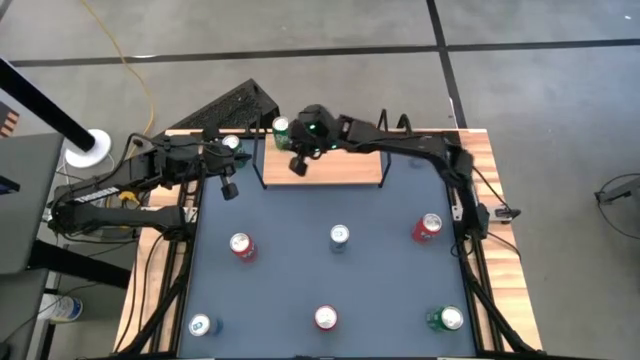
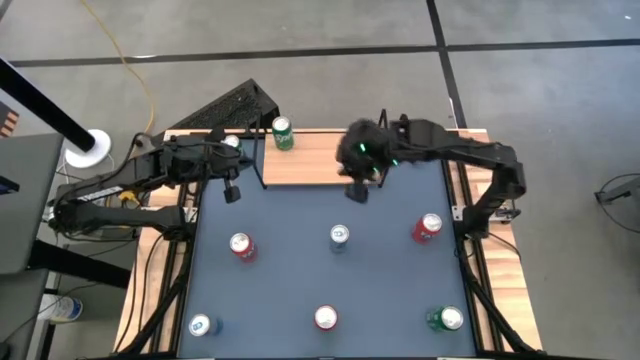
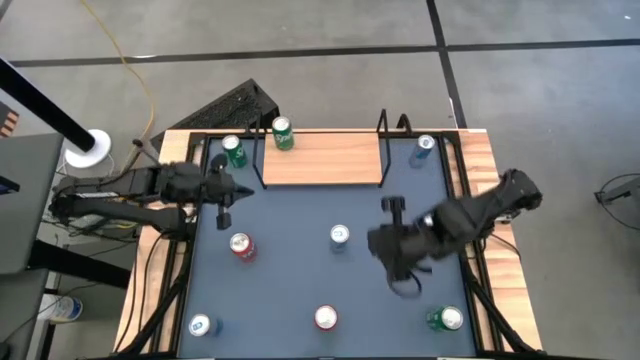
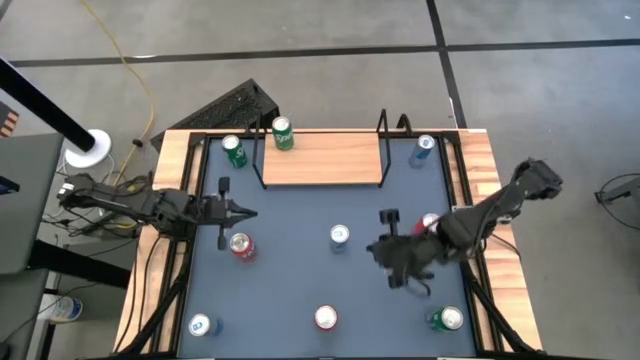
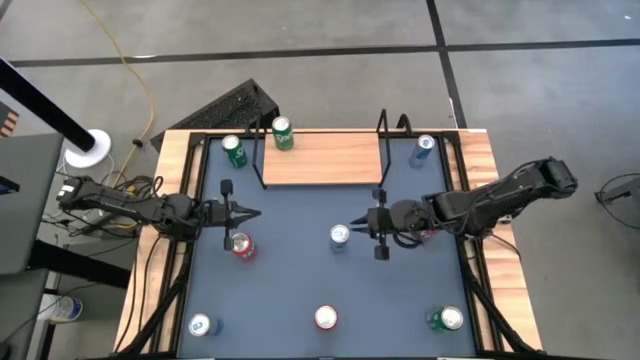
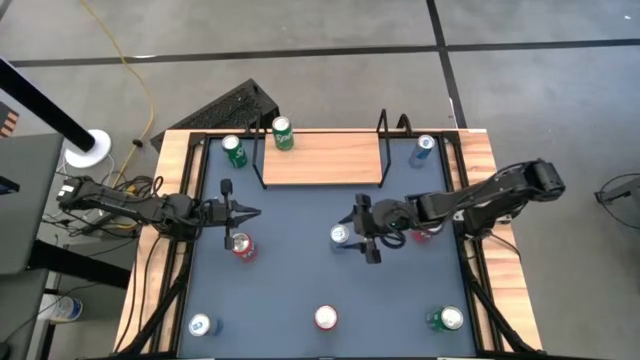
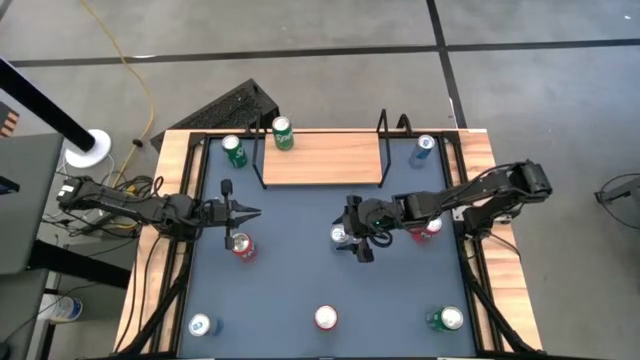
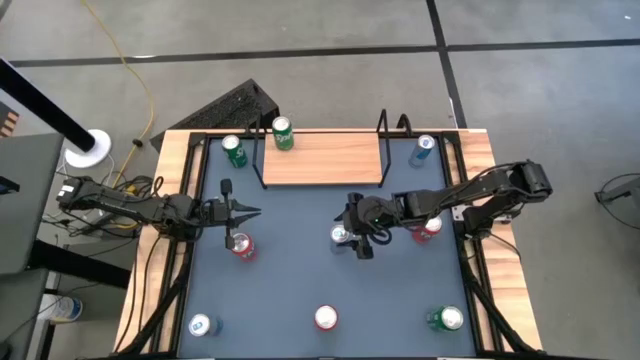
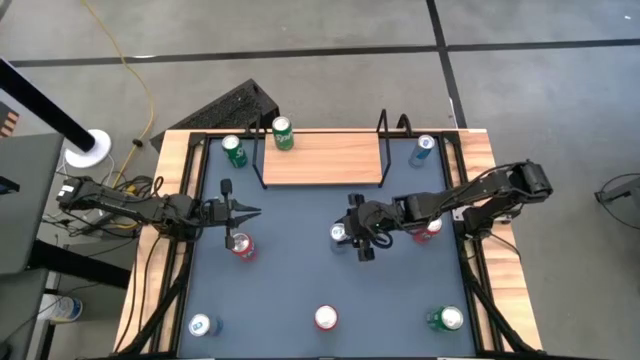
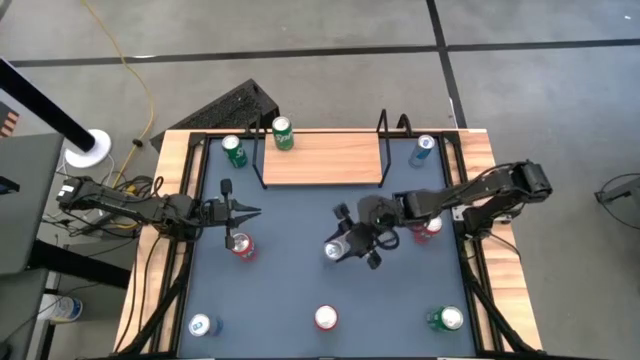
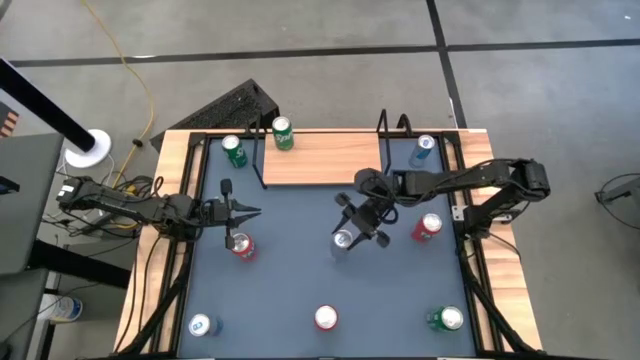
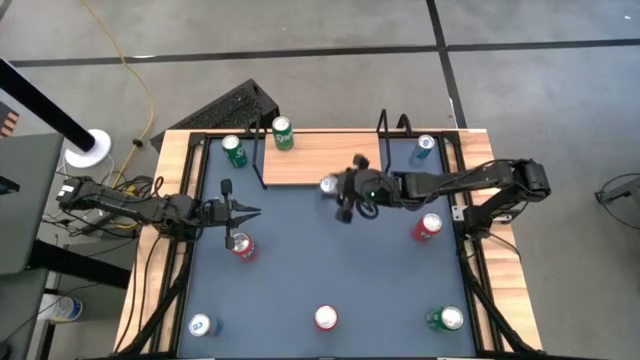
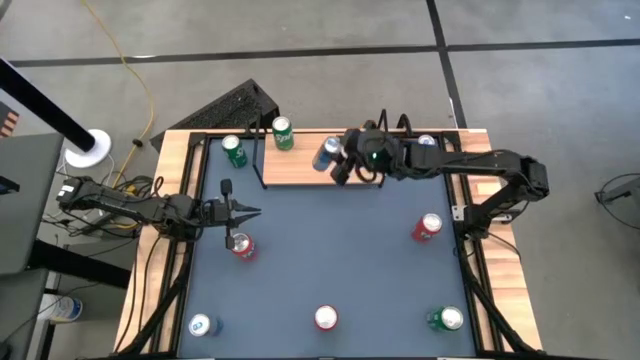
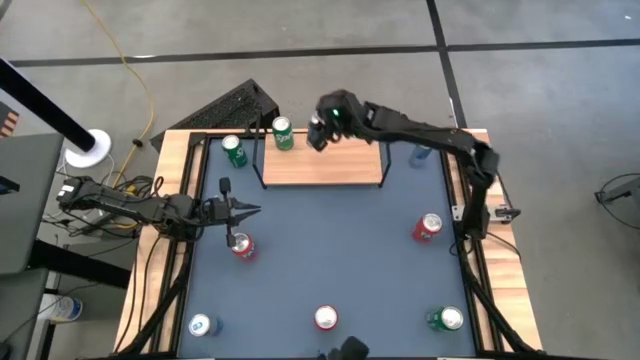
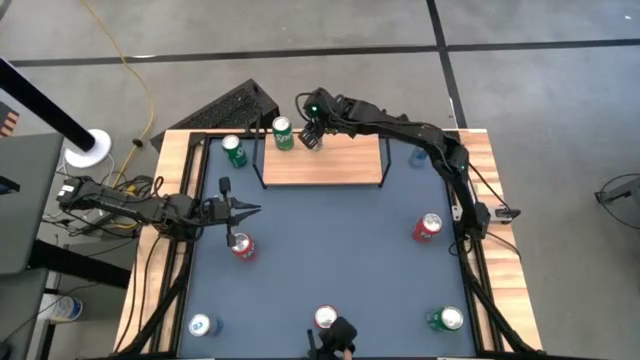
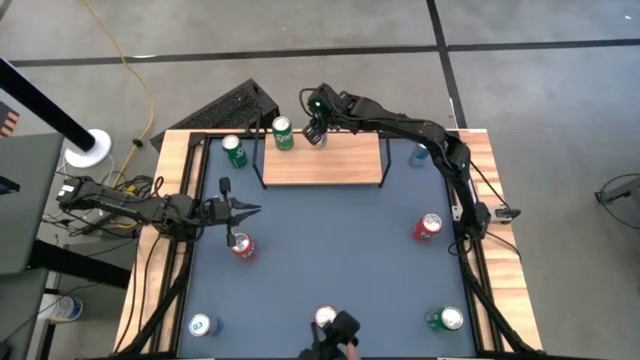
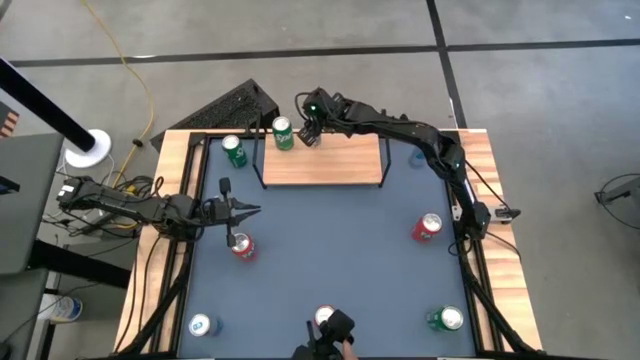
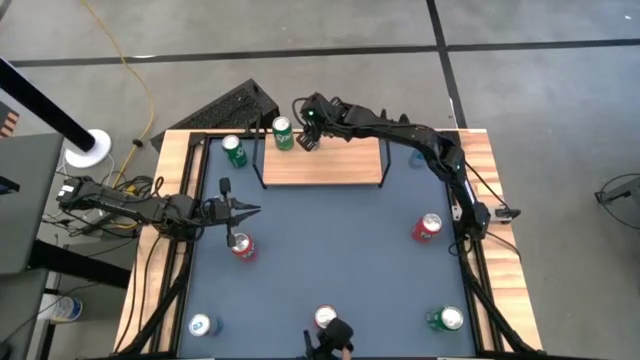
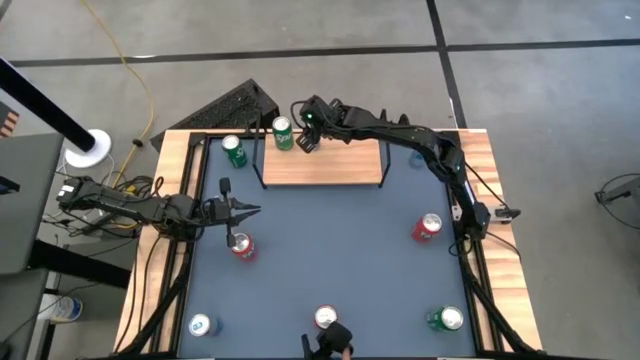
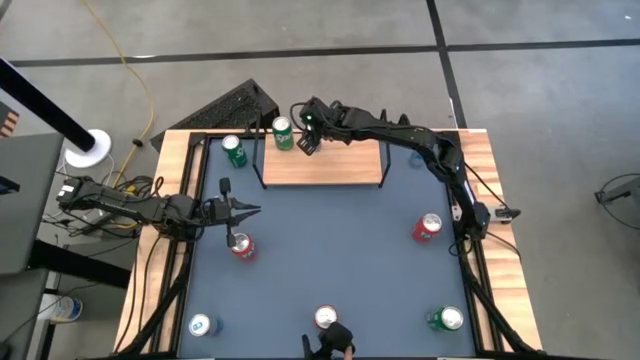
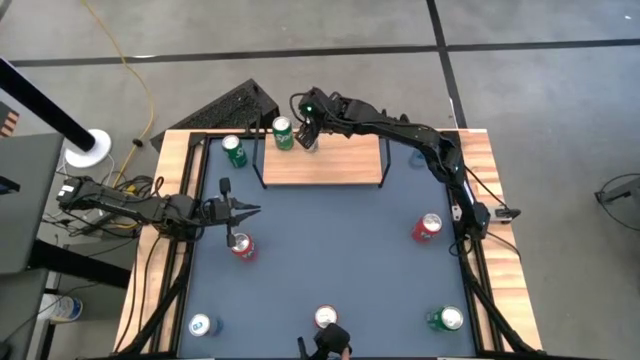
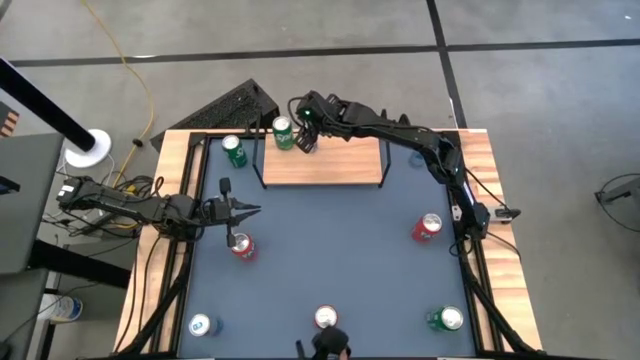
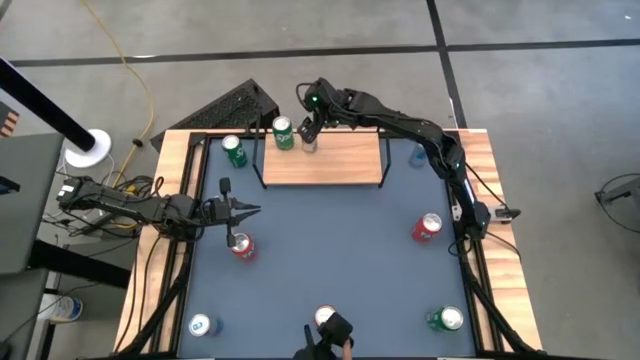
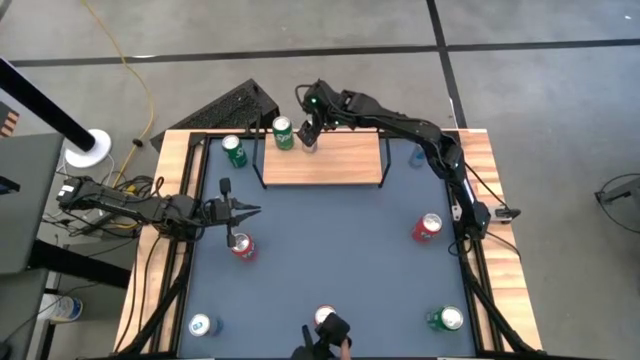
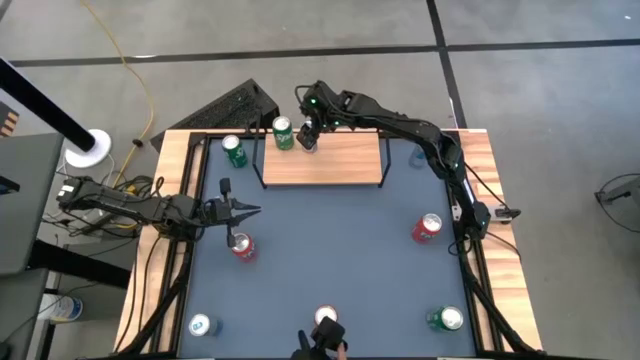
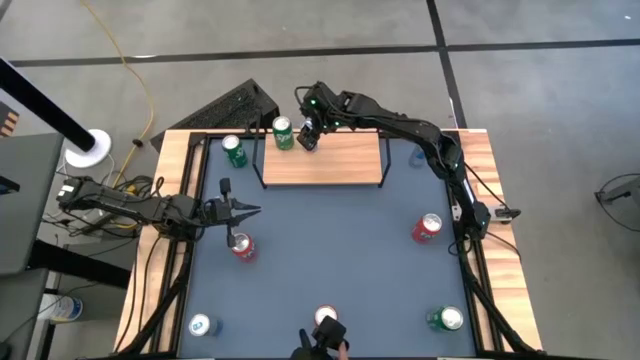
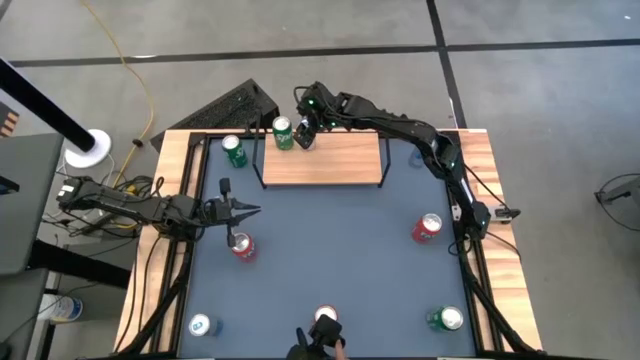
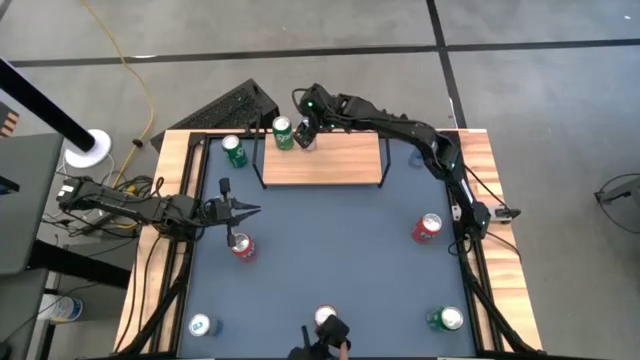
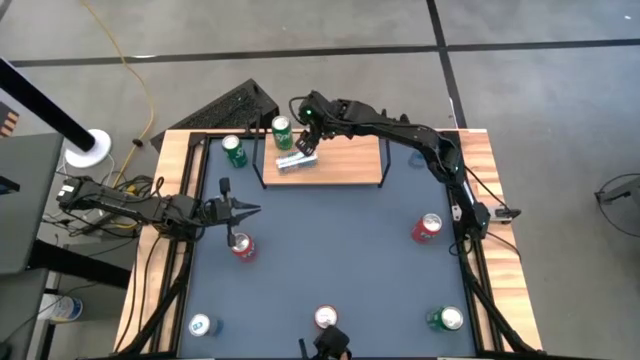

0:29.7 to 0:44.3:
Task: Place canned beverage on shelf
Put the middle blue soda can on the shelf

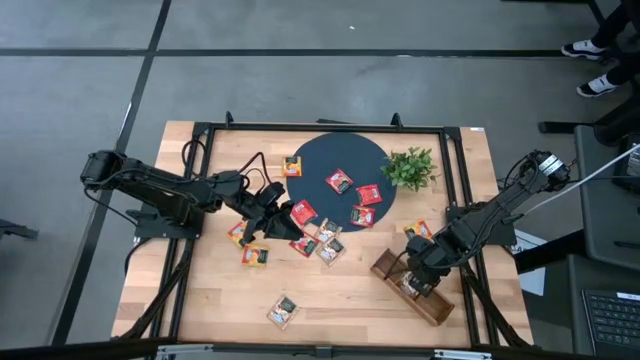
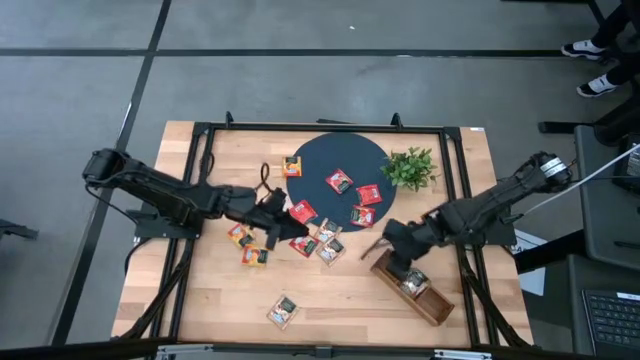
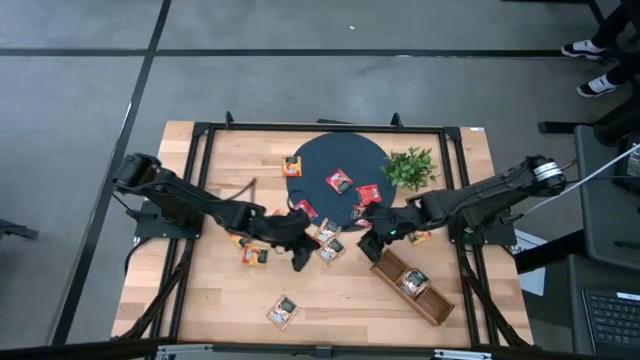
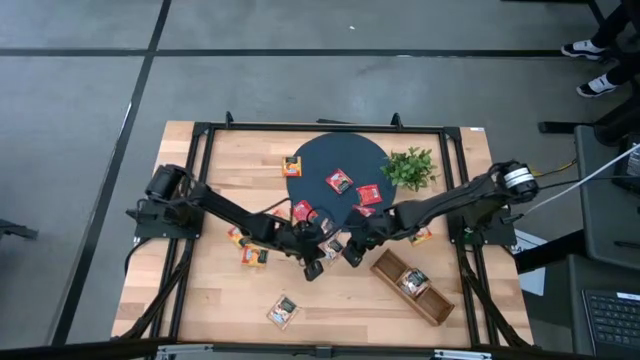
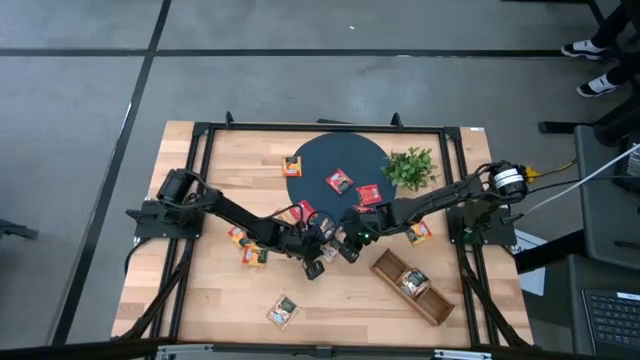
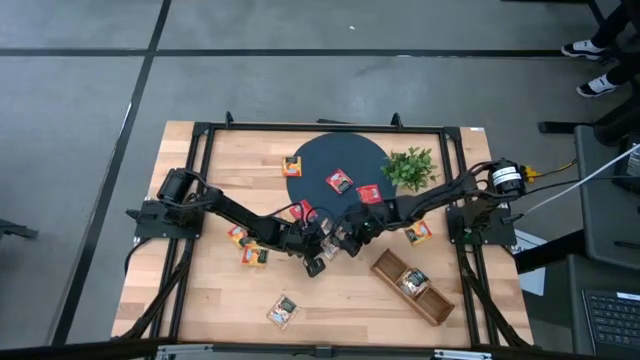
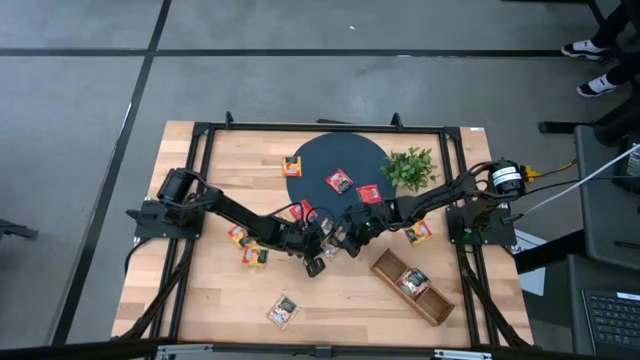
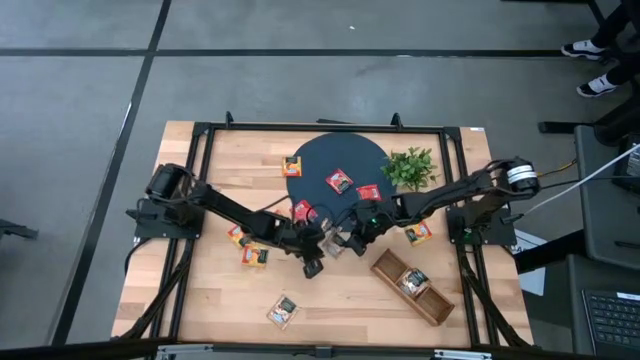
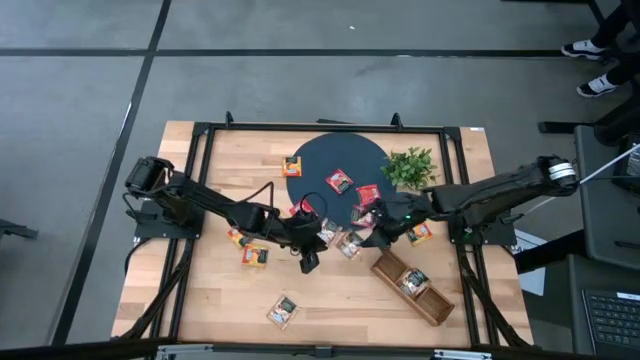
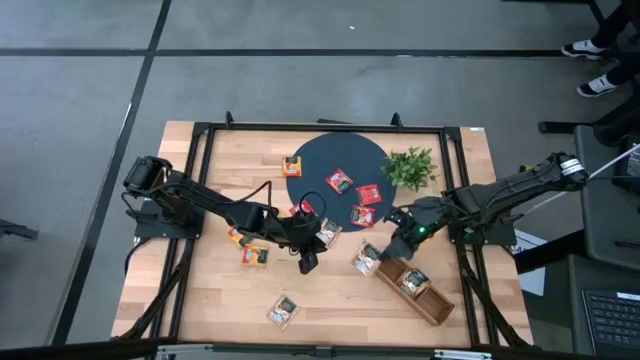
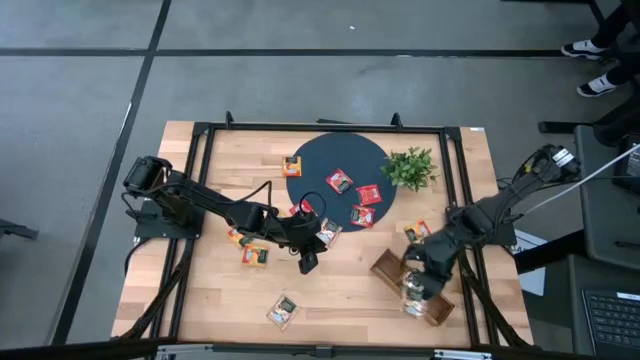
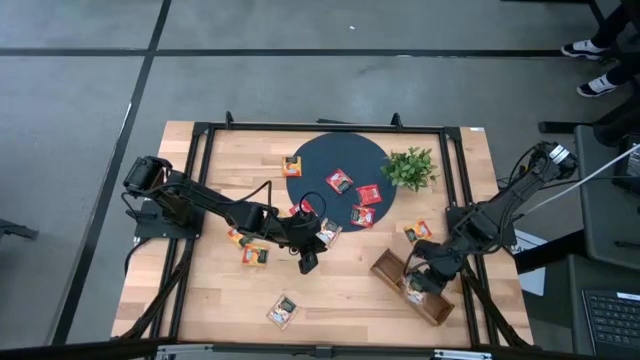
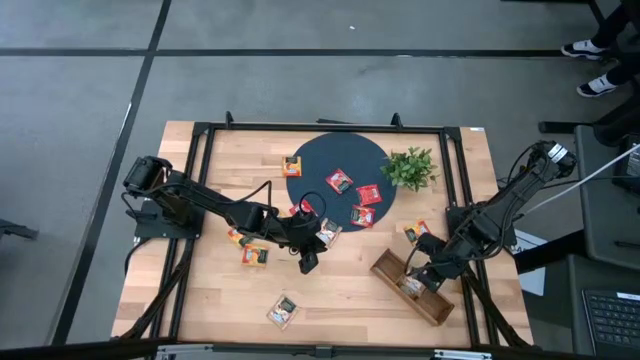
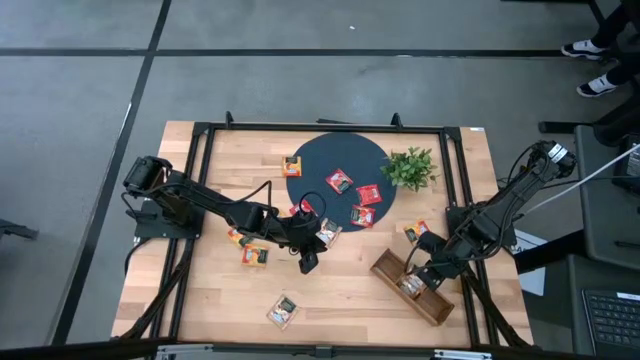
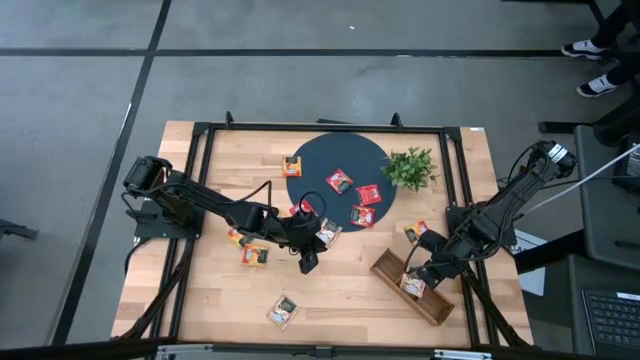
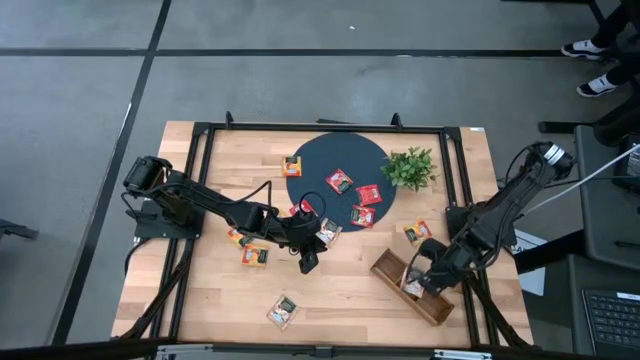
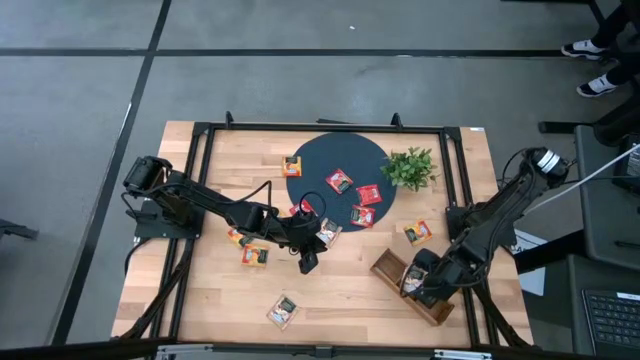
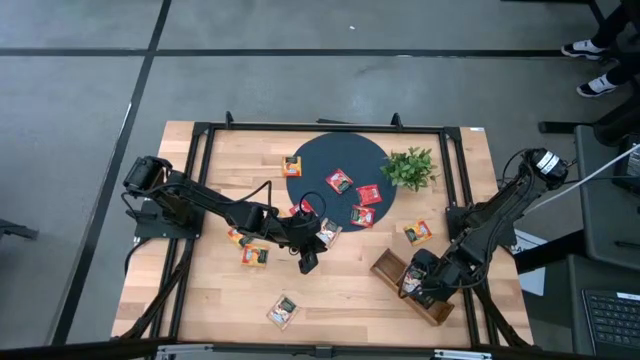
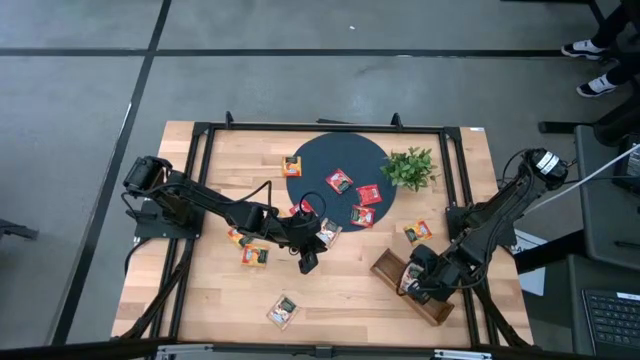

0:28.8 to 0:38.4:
Task: Pick & Place Tea
Put the brown tea bag into the middle section of the wooden organizer
